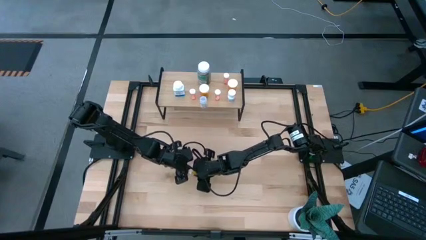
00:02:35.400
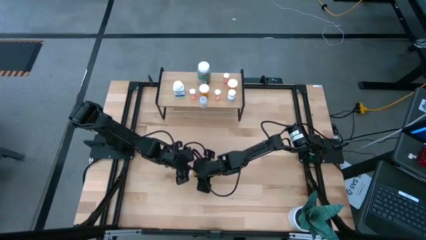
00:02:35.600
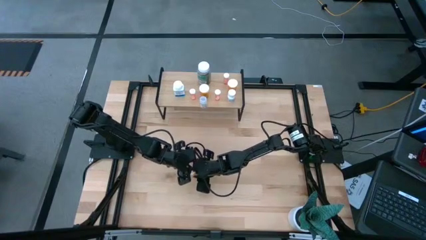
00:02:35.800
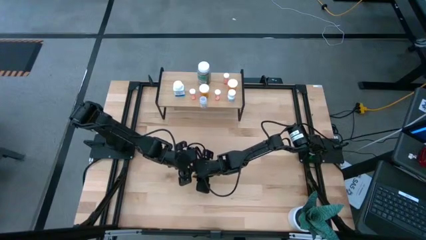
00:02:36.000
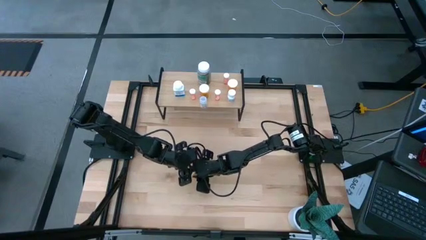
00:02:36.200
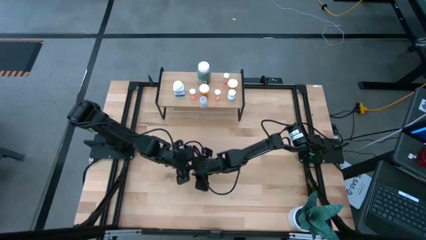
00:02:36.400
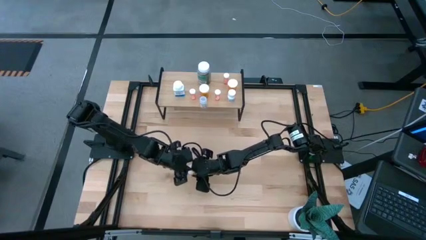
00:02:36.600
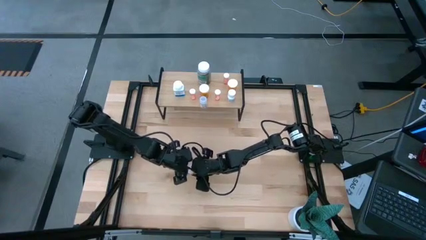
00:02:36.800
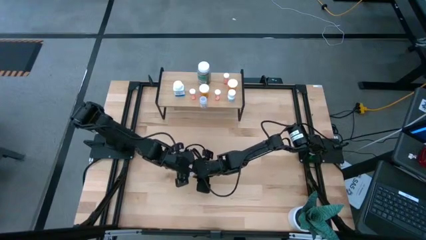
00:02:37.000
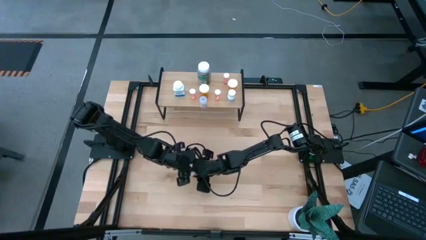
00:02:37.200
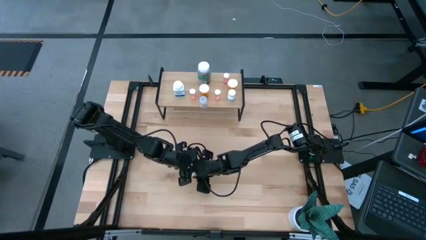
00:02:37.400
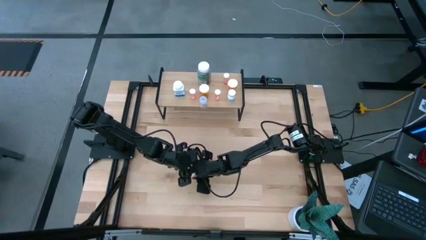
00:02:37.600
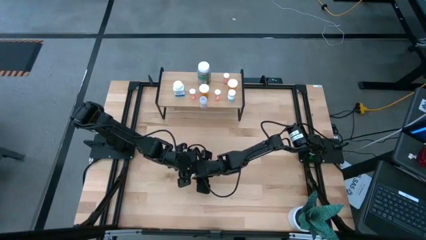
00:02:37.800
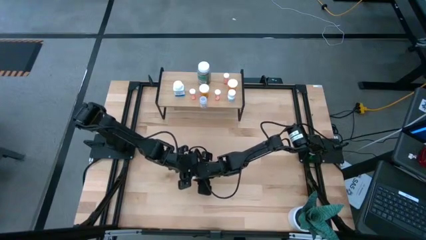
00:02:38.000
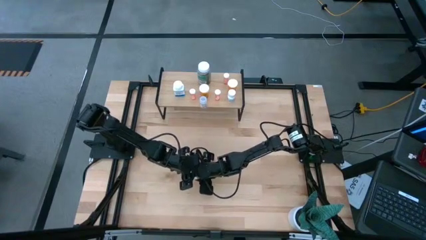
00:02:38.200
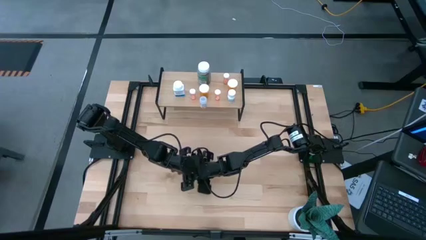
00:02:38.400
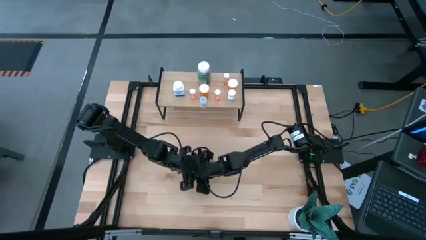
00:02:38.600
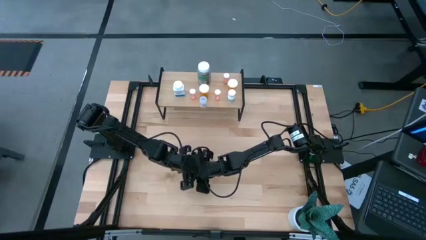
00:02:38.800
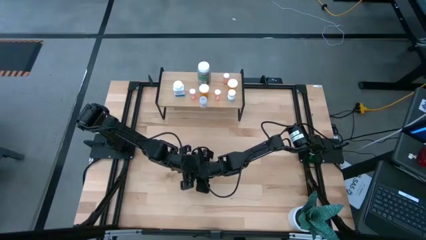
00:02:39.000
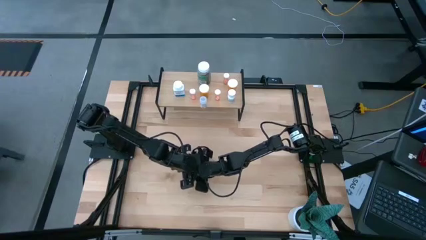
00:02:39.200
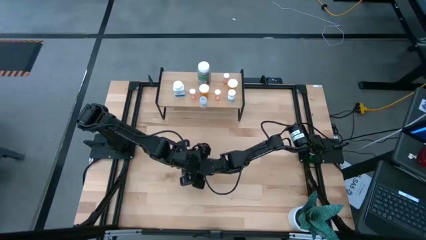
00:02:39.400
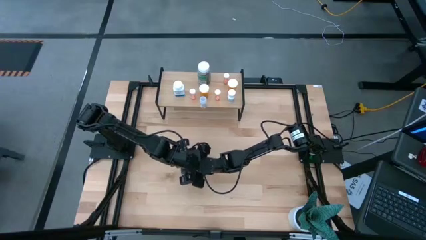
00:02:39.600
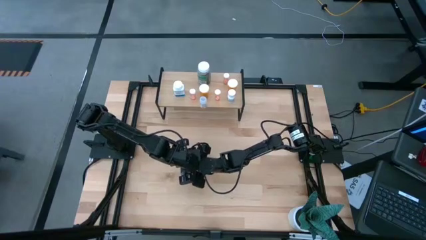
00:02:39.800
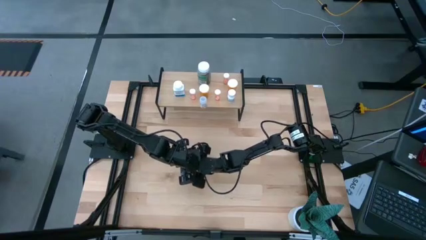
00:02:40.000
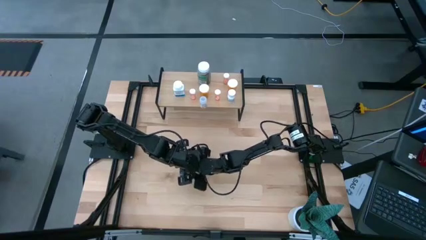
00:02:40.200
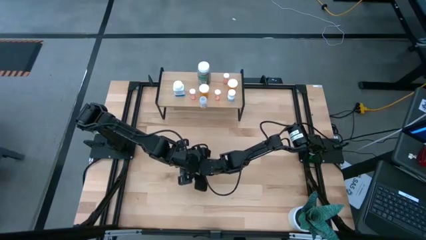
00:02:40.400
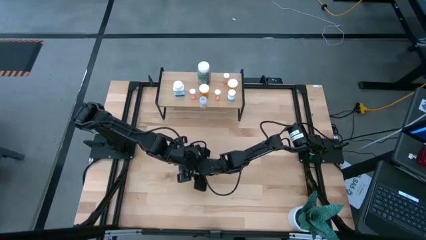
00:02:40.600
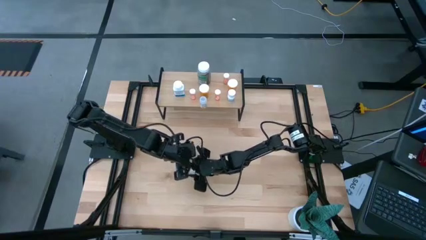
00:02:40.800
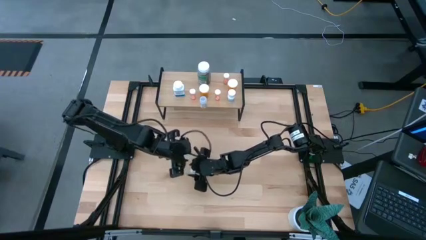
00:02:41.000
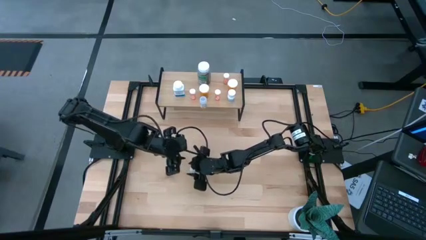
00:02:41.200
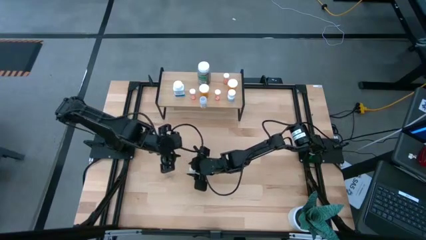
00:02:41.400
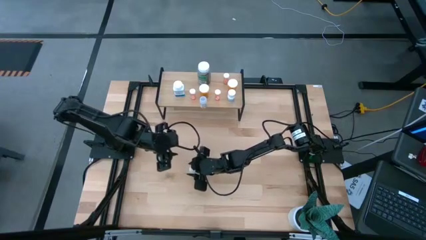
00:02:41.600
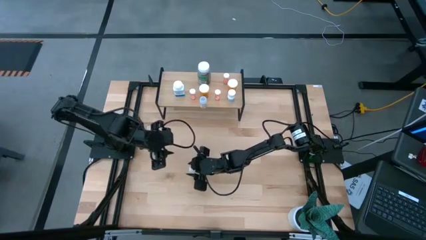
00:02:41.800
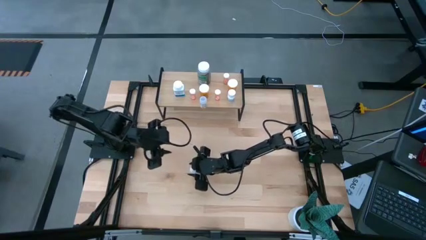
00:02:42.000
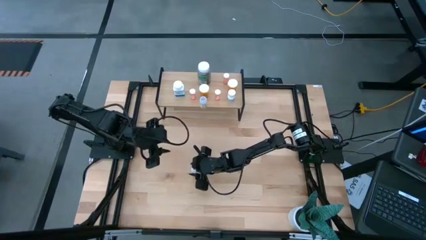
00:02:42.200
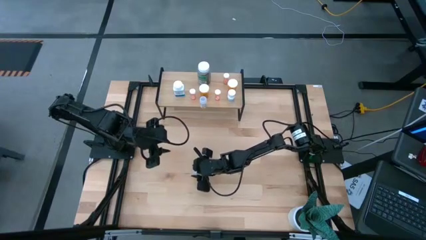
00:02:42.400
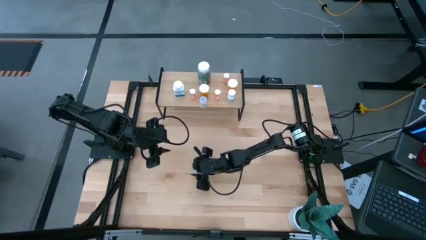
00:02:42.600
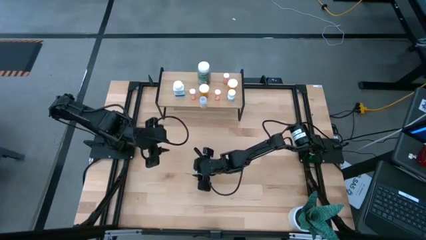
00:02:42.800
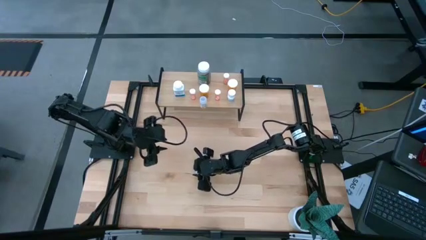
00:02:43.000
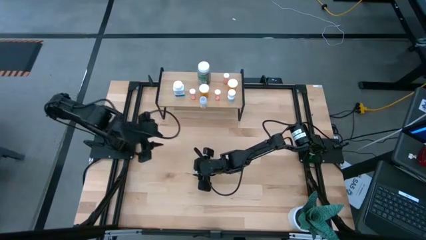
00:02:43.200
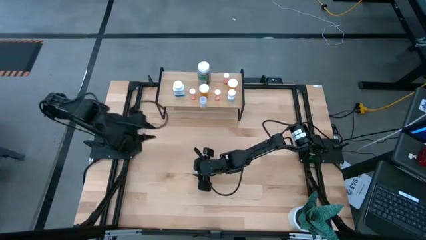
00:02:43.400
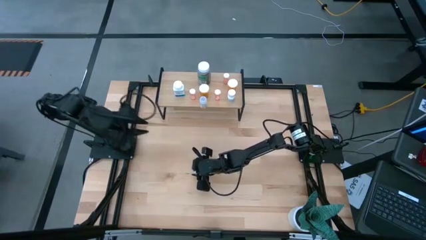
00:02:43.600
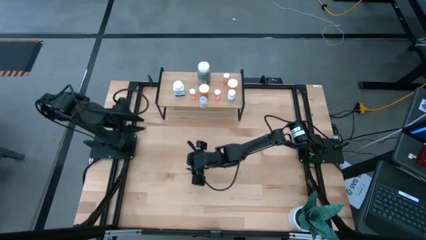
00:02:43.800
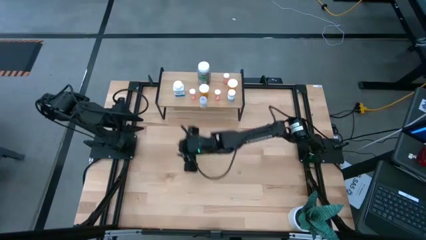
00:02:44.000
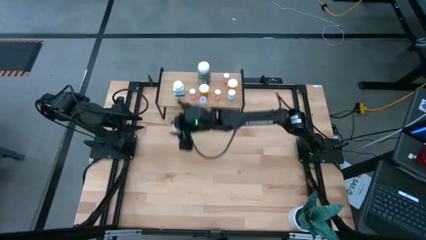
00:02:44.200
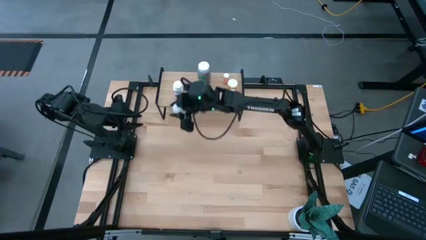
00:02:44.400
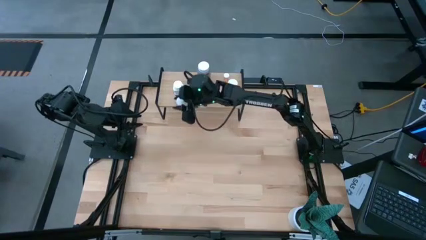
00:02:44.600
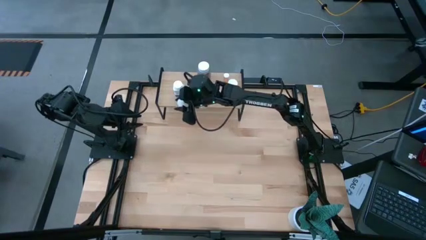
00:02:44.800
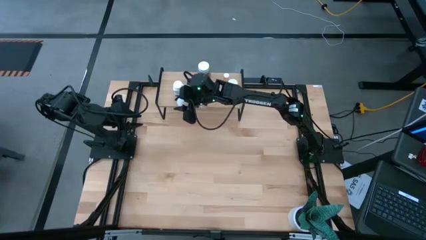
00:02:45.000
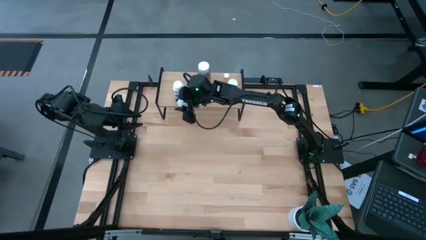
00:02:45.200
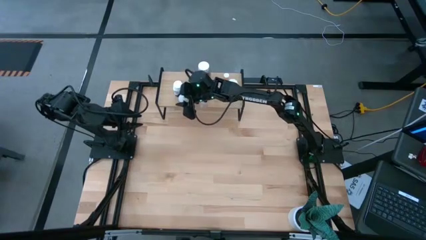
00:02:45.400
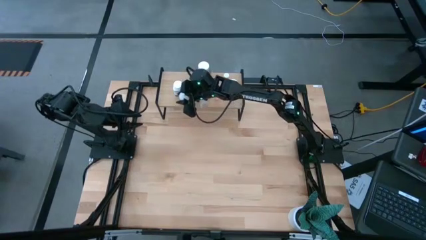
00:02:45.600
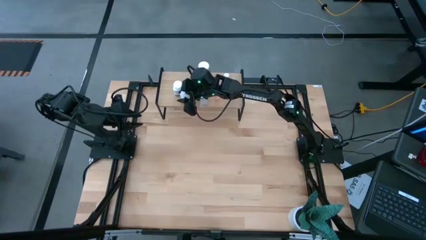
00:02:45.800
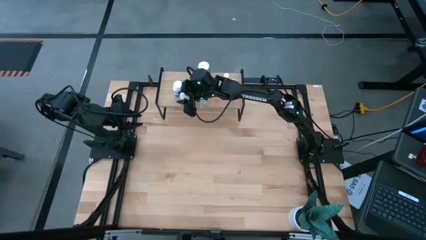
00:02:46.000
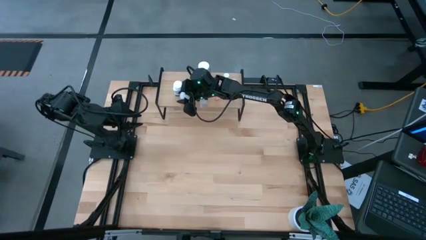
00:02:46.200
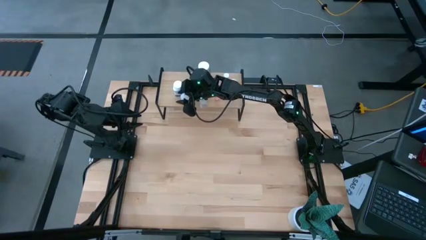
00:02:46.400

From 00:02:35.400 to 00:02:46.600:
Task: Pick and place medicine bottles onto shelf by color
Put the orange pill bottle on the shelf

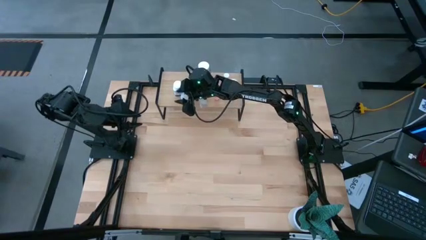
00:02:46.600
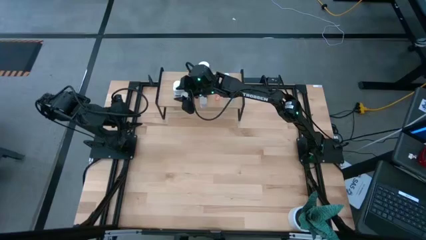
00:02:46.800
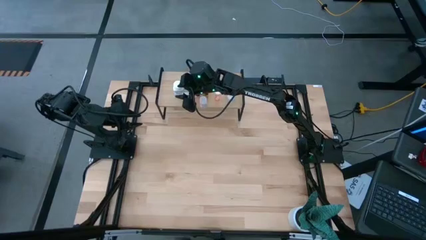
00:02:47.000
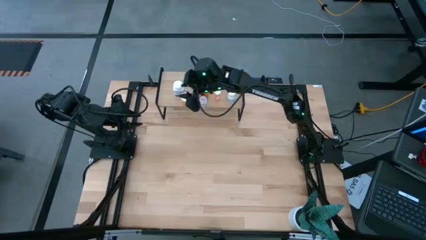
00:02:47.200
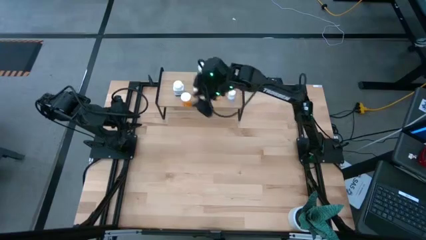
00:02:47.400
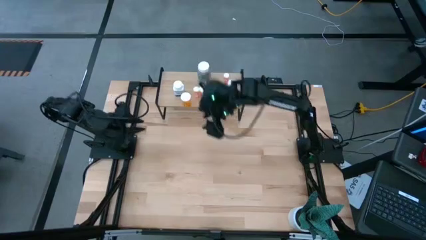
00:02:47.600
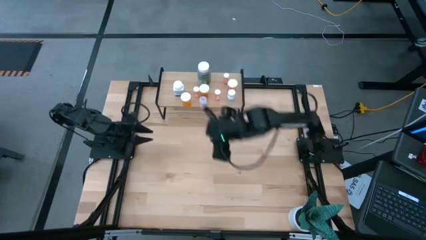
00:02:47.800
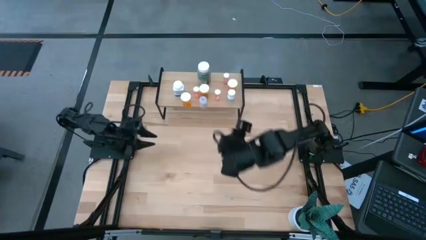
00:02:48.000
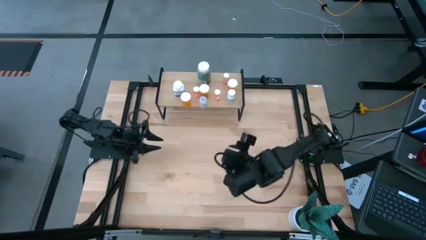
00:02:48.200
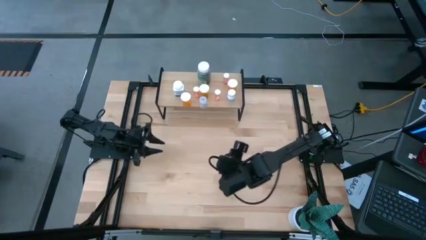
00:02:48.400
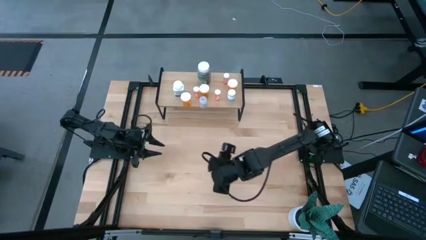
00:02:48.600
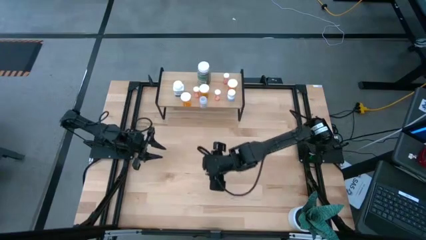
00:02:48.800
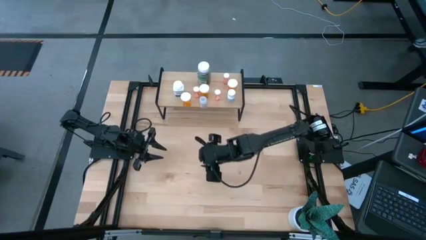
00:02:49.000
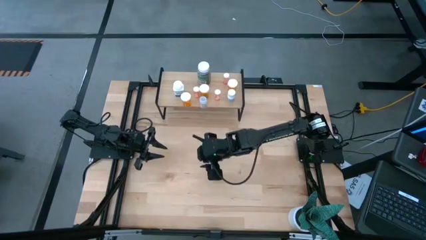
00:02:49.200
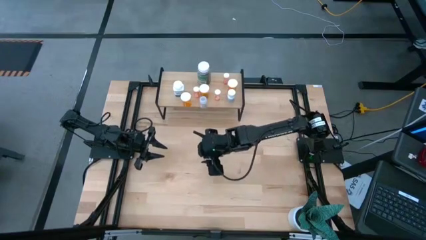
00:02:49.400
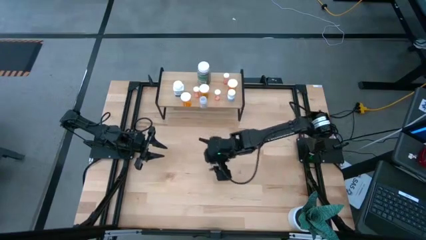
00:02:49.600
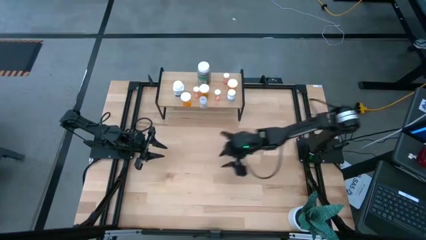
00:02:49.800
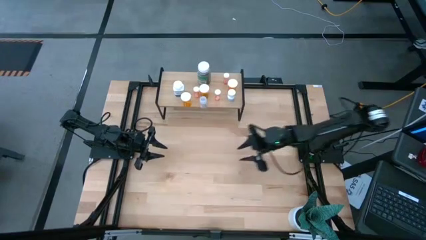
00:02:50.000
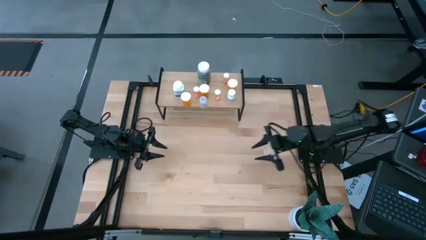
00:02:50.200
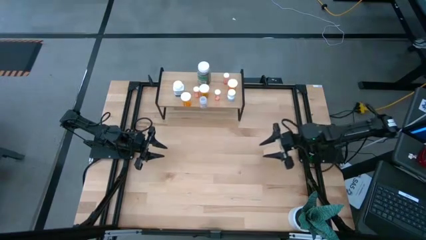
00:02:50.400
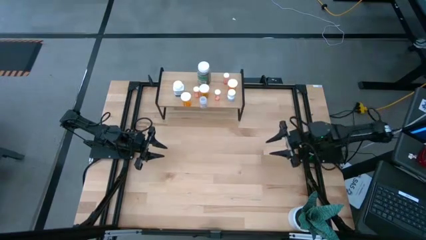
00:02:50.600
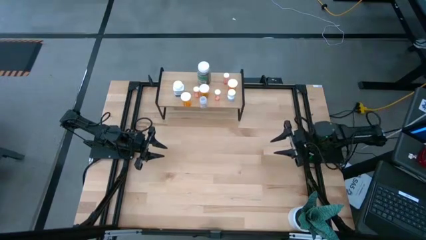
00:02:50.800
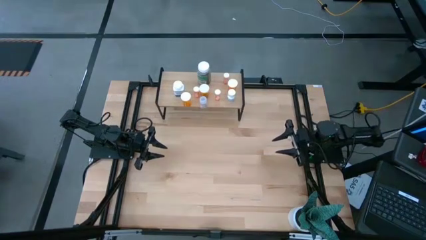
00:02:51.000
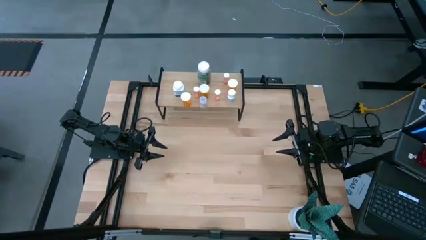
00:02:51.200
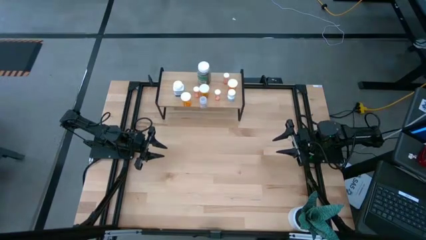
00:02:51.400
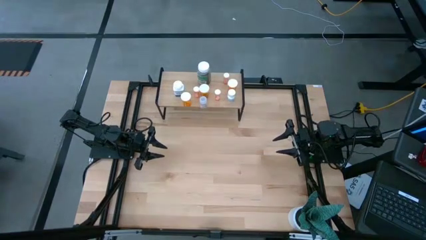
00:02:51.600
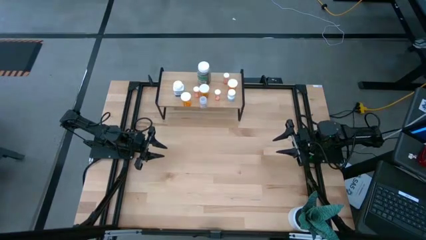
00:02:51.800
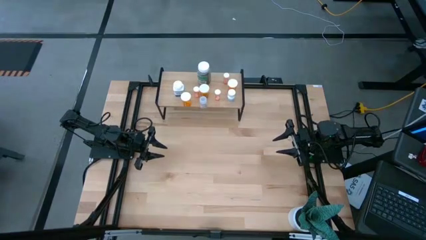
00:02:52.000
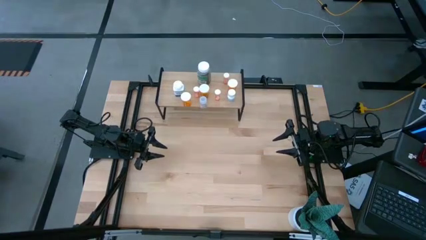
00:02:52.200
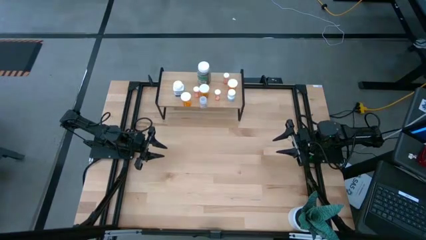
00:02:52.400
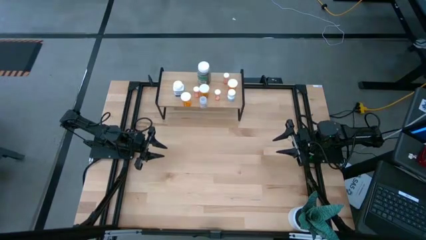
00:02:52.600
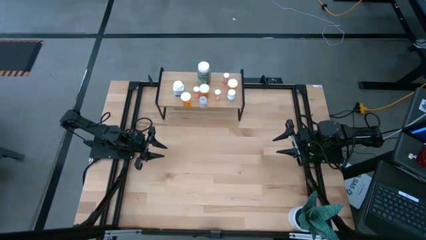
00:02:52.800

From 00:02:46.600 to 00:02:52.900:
Return to Home Position
